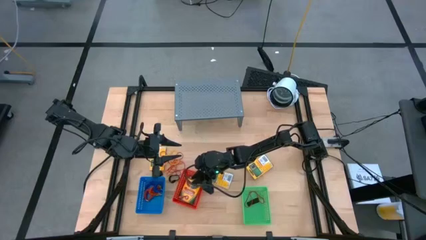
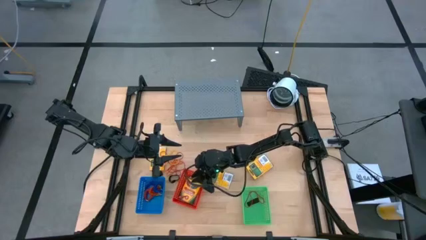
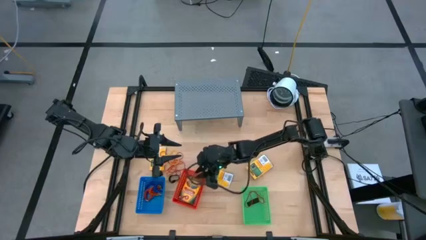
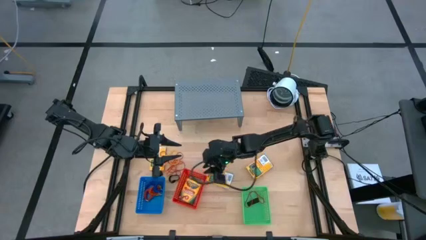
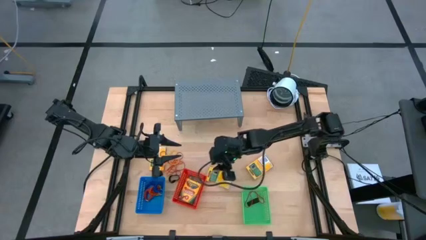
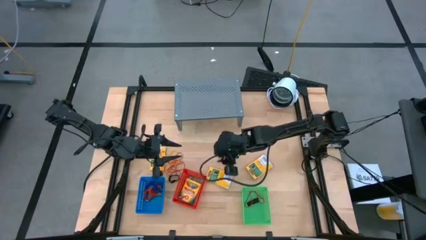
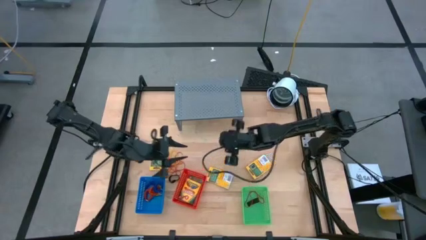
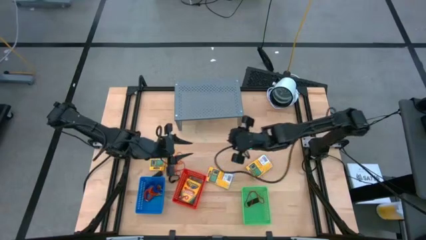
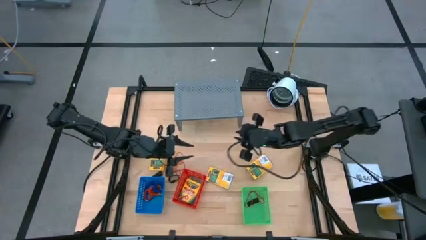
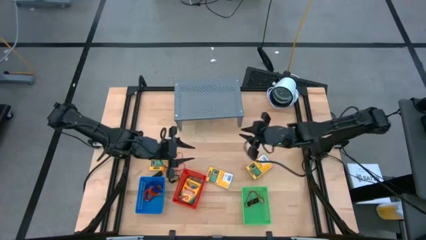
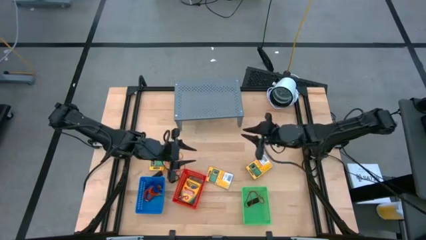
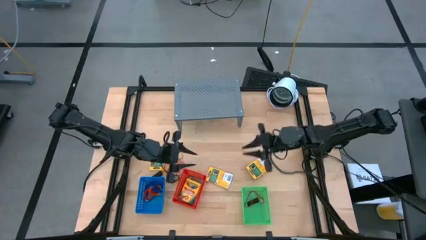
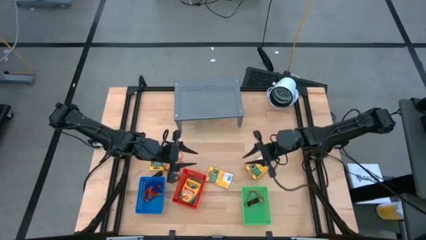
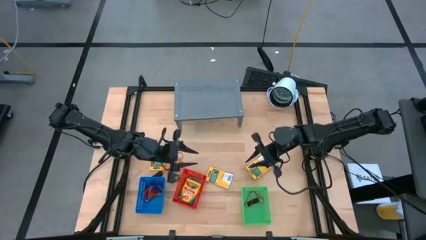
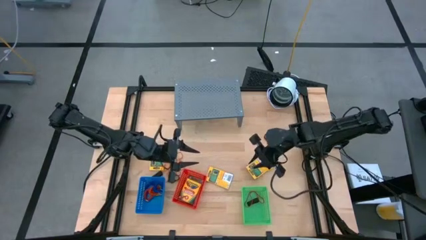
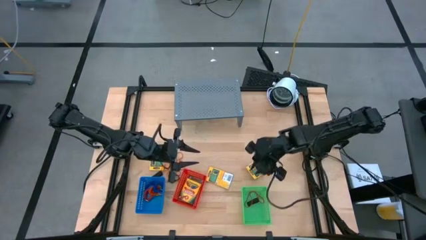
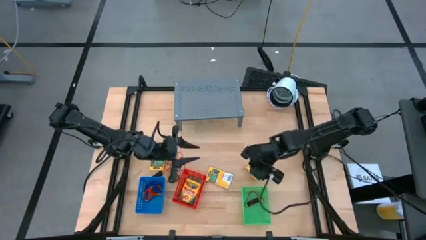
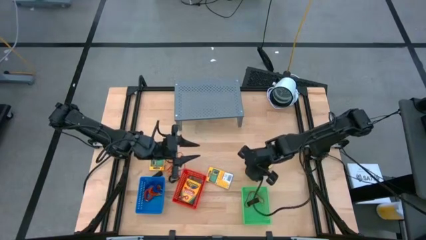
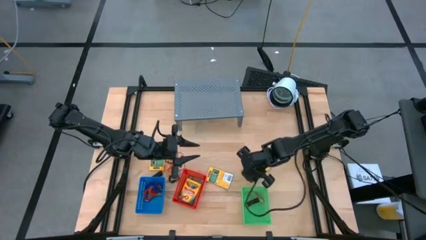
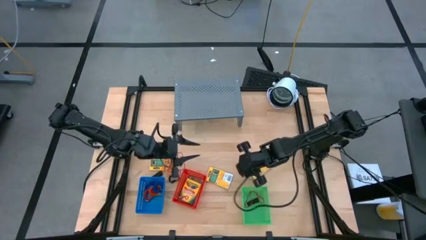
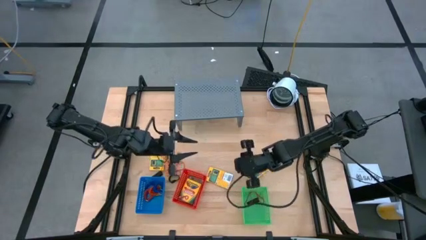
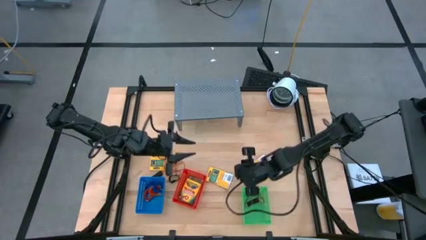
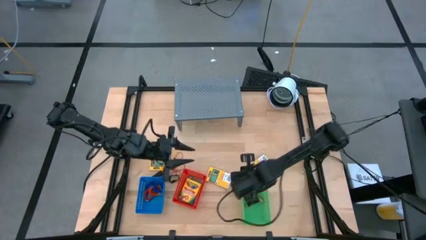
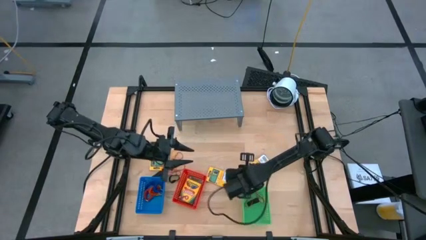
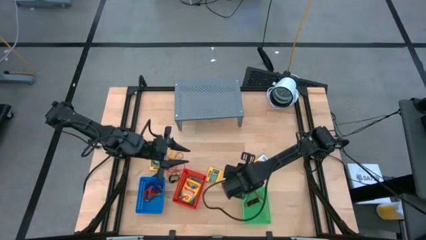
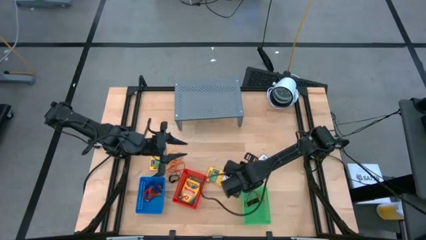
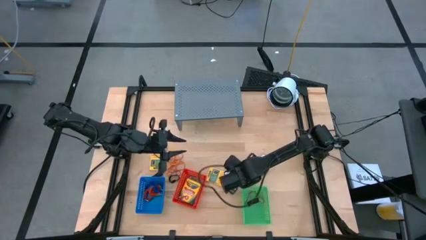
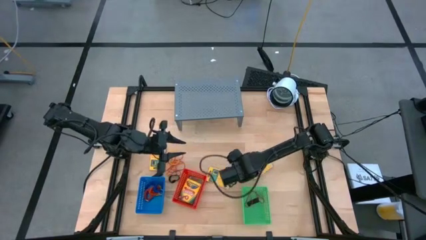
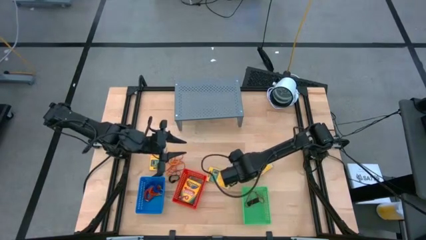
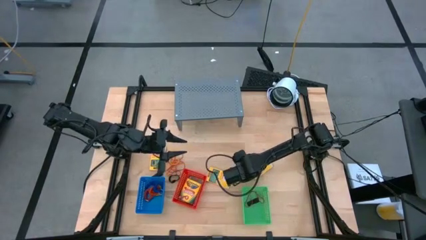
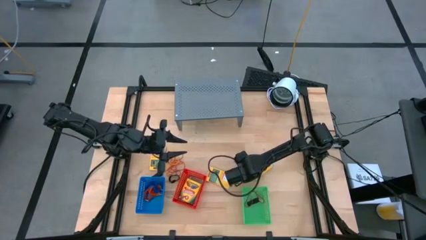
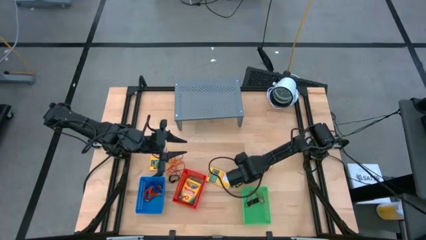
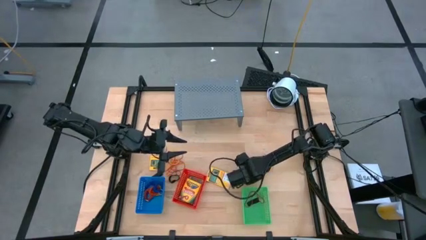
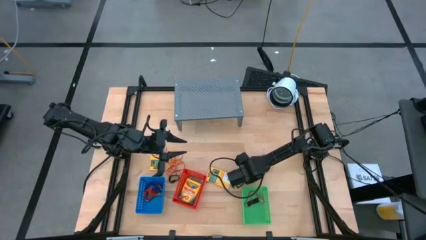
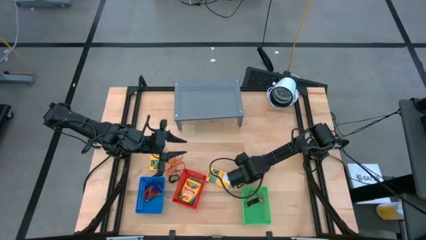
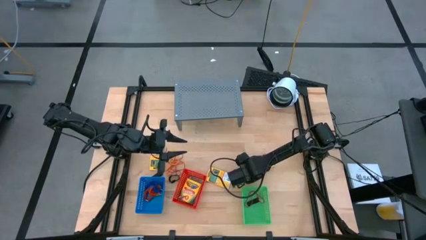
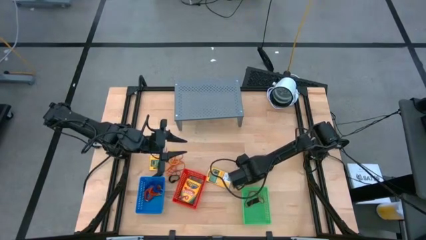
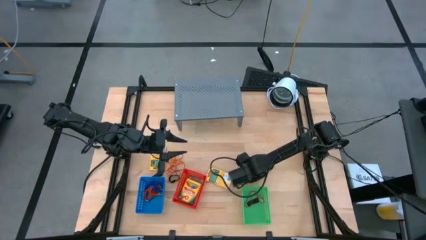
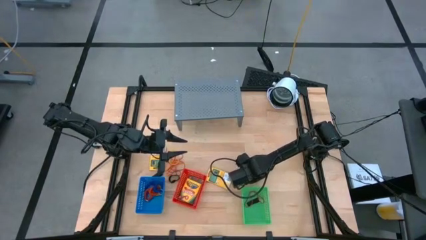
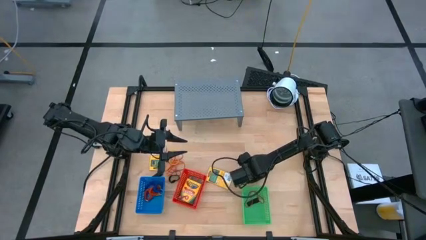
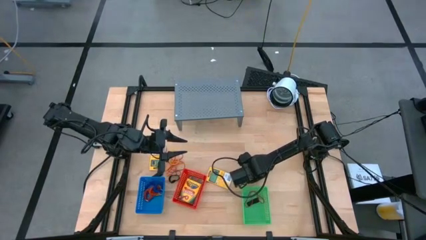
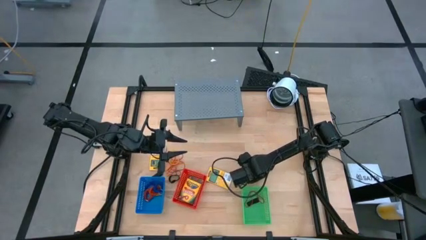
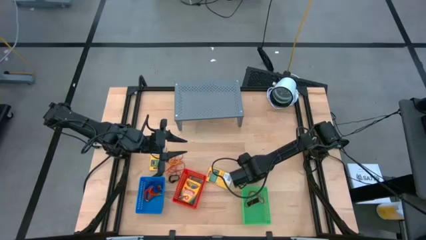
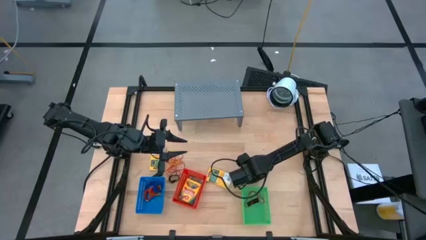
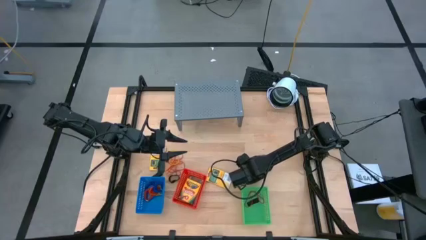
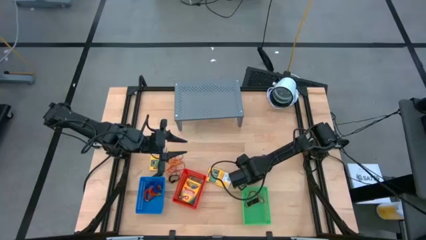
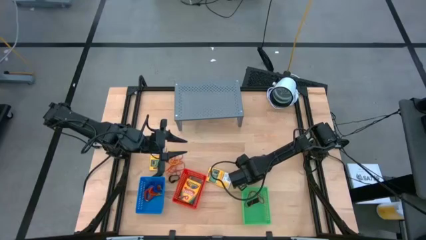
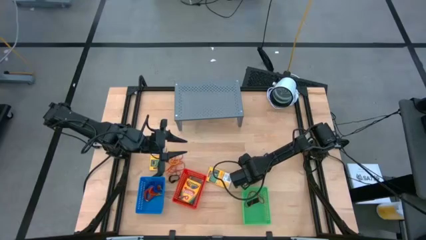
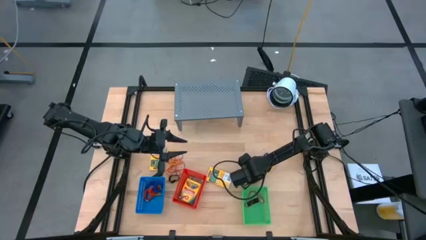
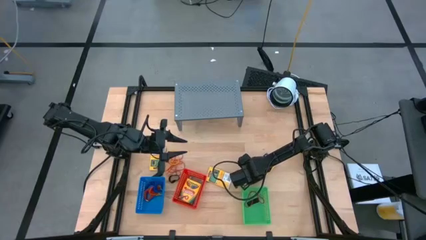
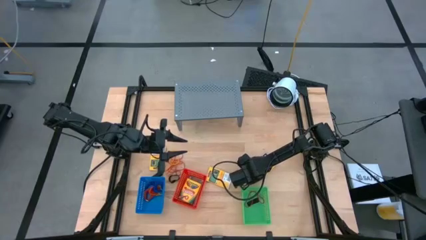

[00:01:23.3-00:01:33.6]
Task: Pick & Place Office Desk Supplies
Put the right yellow crayon box into the red basket
